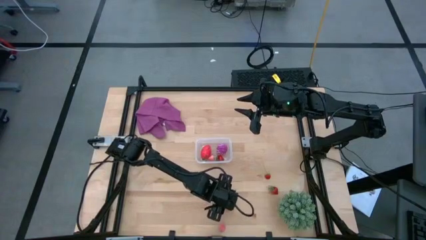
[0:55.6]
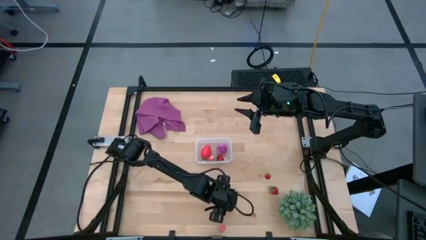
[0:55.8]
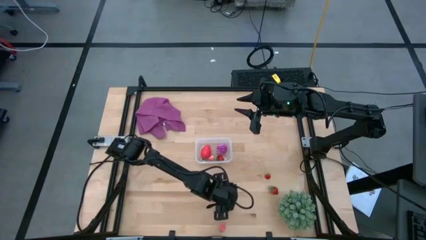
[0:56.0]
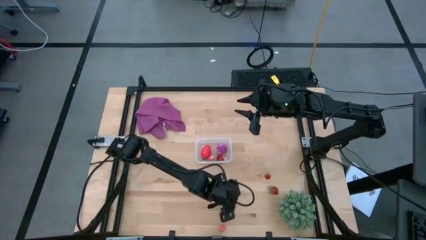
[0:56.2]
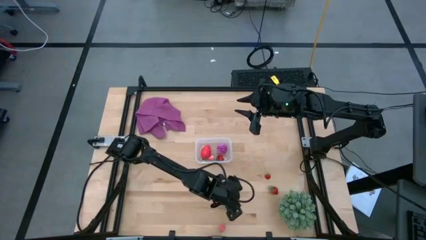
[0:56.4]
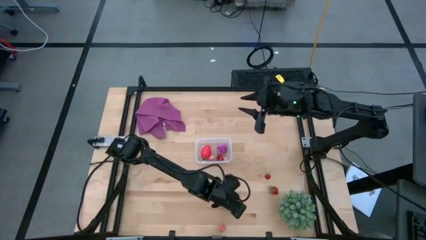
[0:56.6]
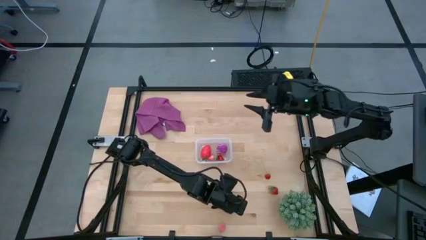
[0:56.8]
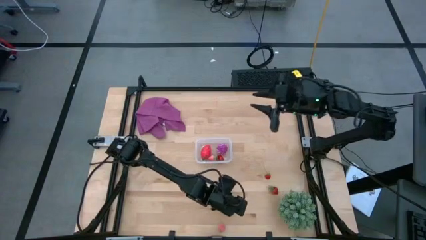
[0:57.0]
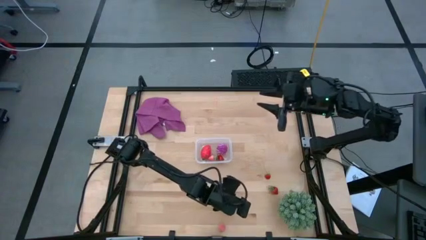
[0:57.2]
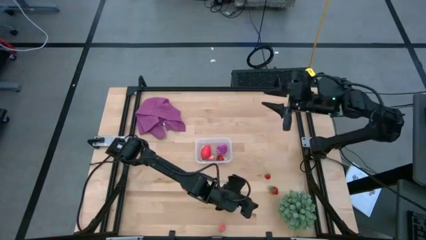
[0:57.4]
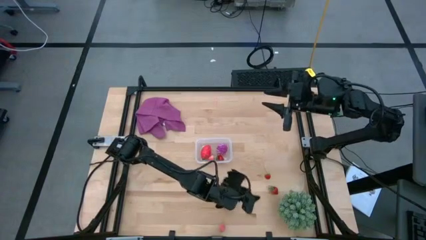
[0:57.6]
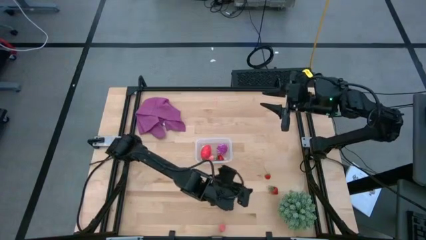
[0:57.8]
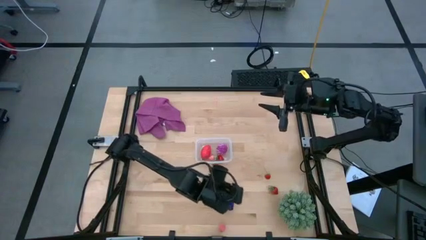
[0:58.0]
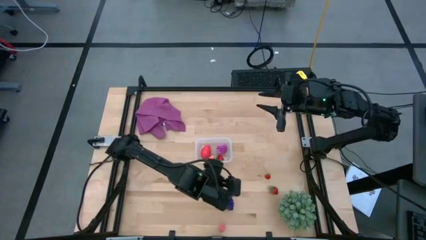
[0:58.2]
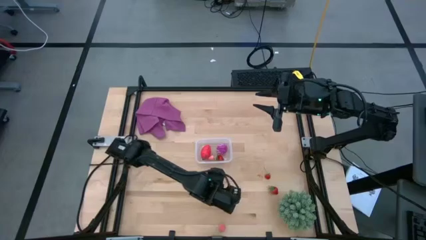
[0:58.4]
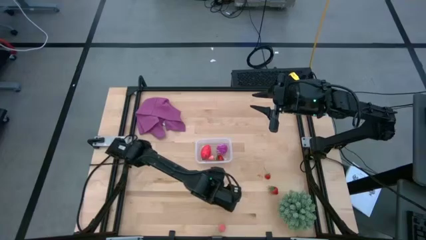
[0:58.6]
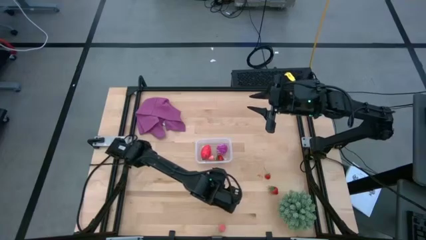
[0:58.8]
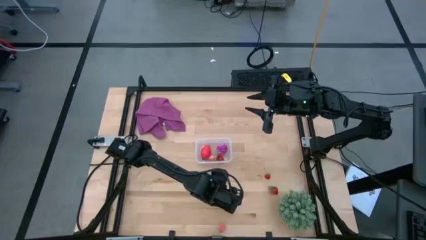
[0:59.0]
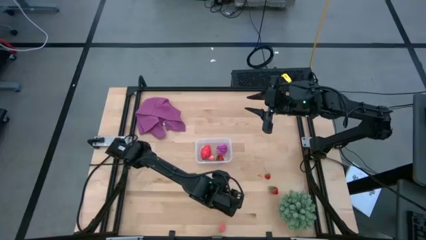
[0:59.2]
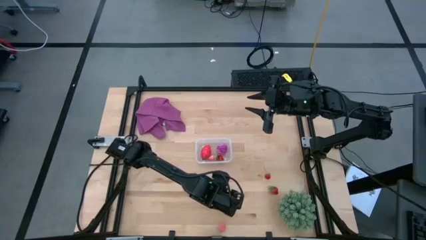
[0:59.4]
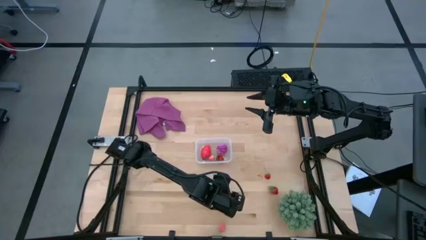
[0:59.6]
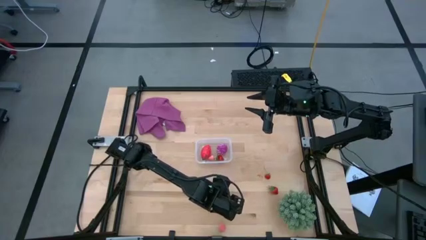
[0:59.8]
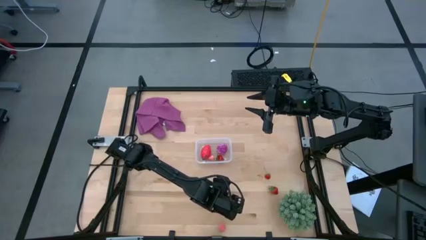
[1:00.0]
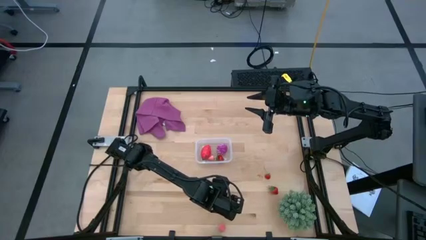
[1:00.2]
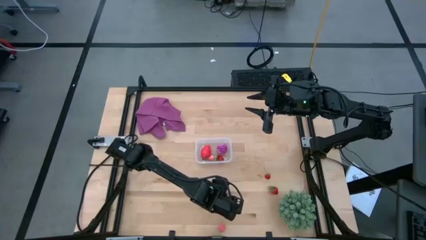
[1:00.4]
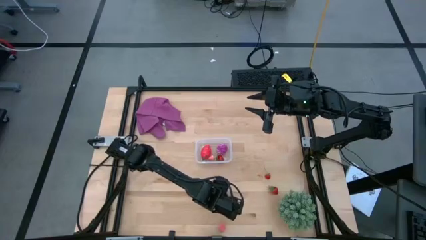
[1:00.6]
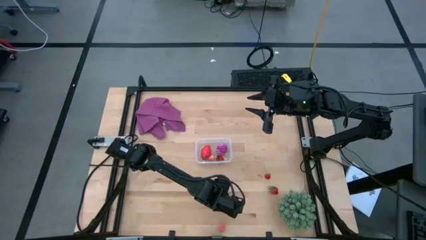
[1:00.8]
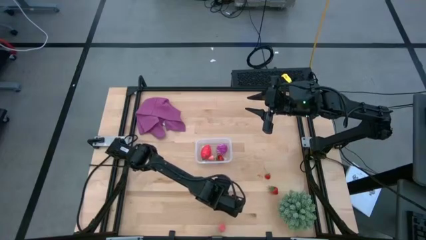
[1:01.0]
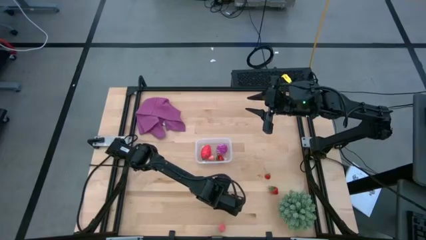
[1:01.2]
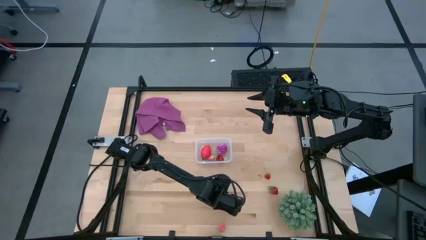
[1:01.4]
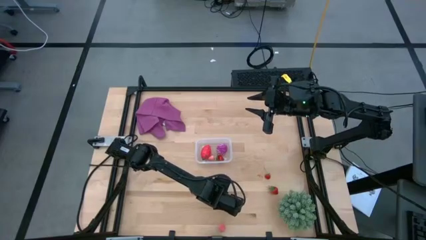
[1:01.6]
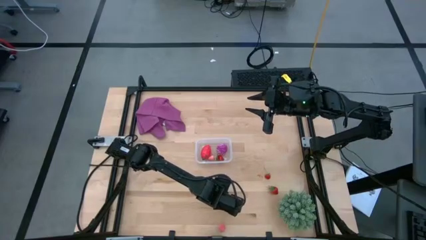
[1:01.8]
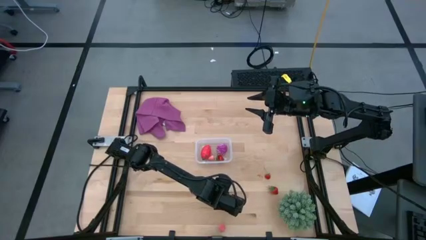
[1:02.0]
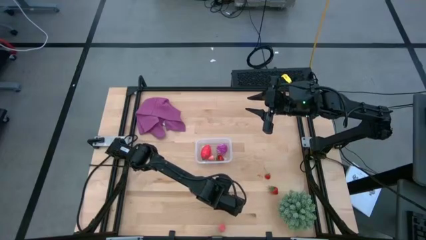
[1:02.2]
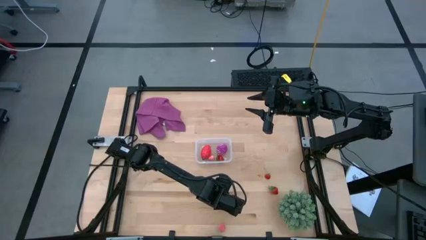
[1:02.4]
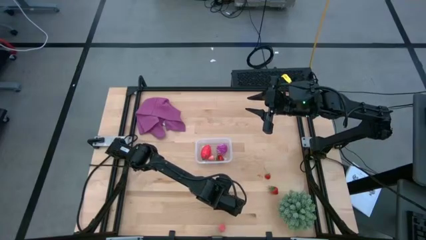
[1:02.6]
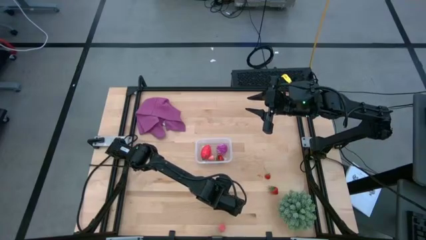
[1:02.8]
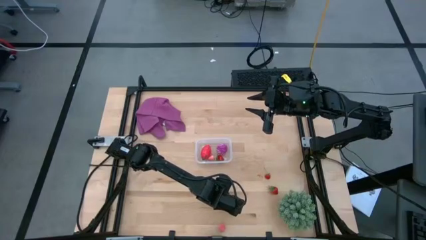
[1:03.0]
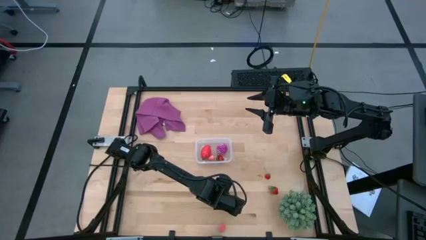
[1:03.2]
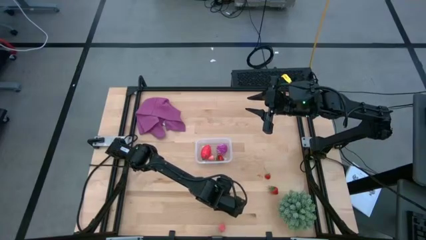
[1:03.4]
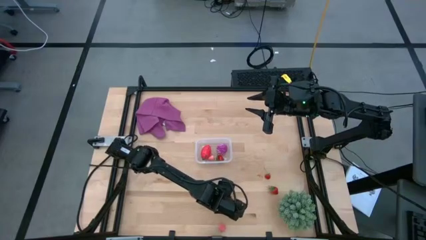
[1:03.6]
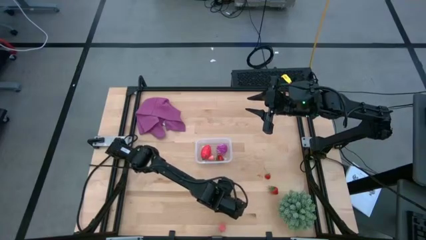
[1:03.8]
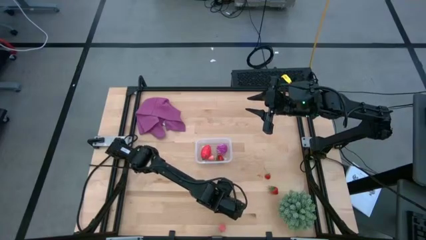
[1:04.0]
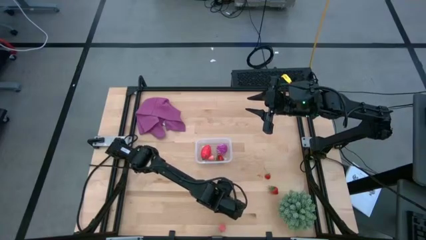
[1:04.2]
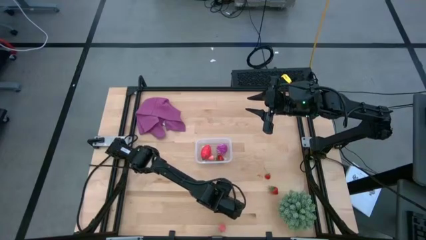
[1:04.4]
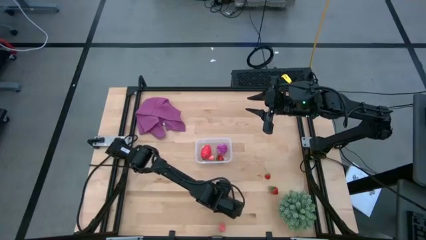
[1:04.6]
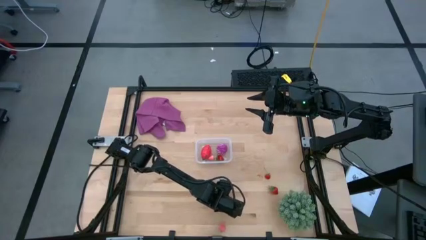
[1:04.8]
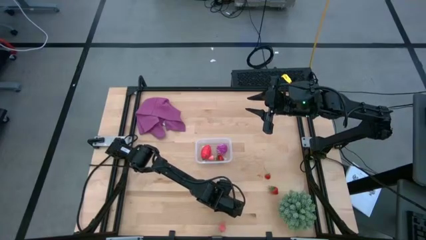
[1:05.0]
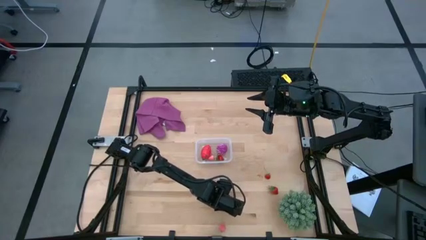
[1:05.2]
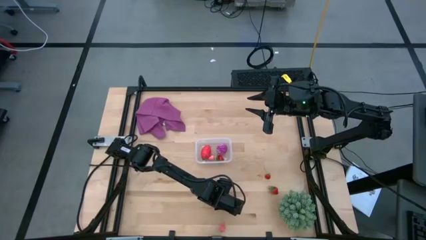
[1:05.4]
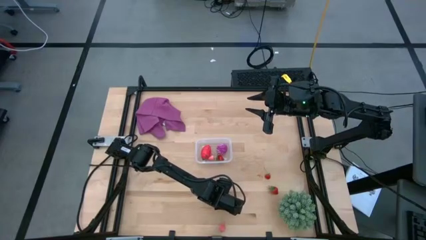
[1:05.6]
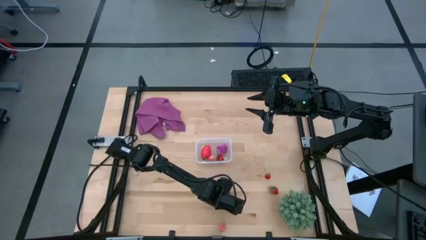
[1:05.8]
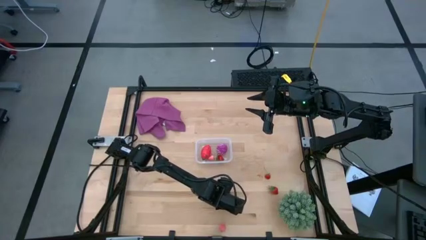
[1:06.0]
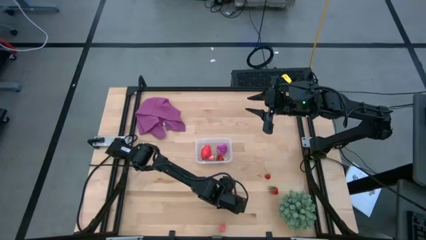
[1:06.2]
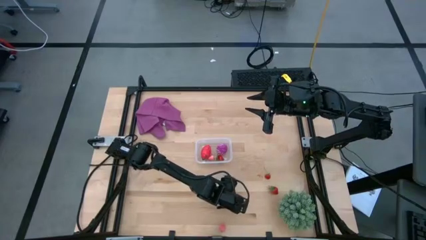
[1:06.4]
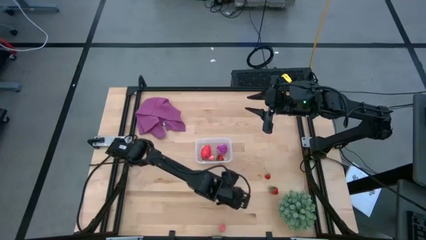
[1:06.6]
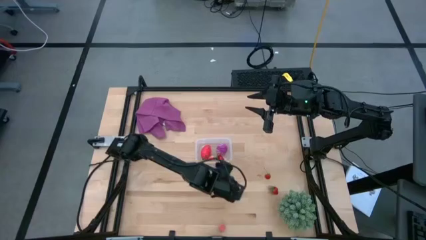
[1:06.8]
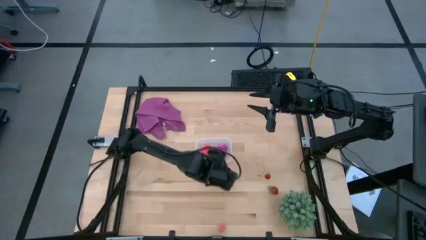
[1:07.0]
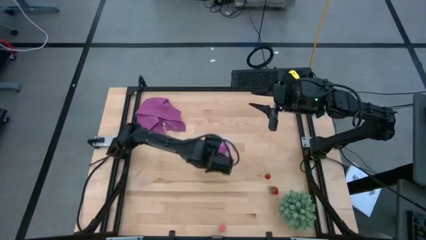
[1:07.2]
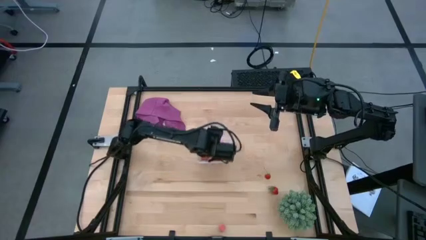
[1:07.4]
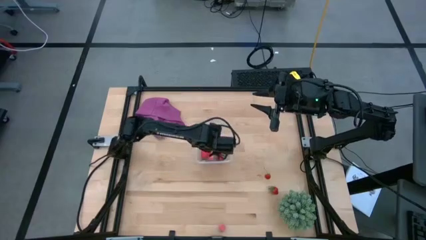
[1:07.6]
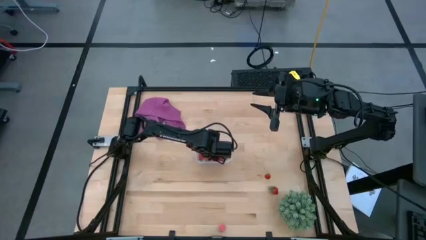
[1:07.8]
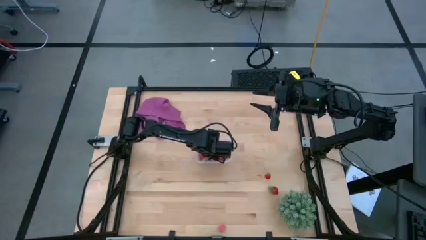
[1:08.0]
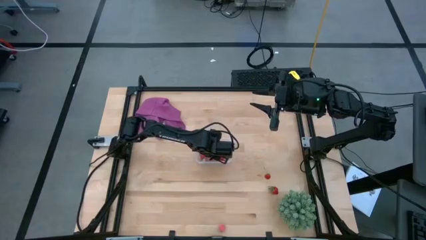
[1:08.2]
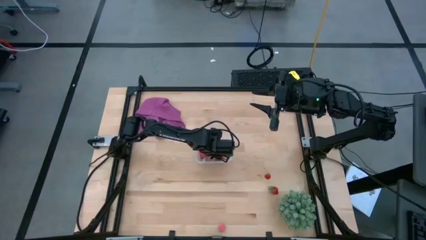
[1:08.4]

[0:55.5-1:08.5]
Task: Pick and placing Produce into tupperware
Put the violet grapes into the transparent bin

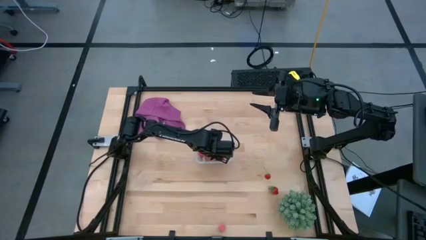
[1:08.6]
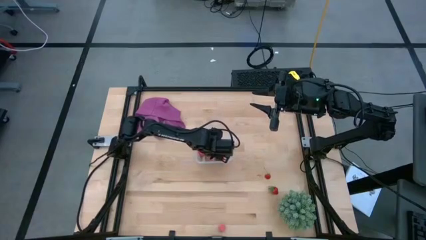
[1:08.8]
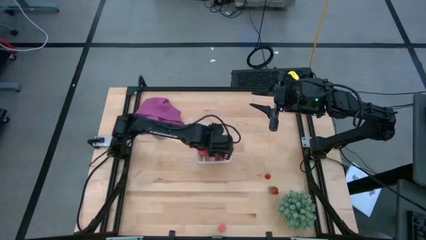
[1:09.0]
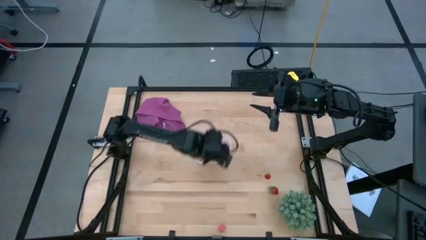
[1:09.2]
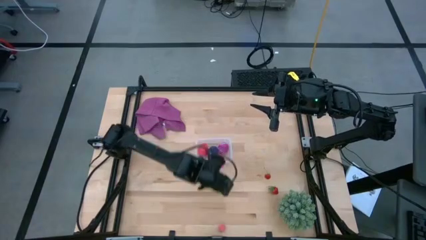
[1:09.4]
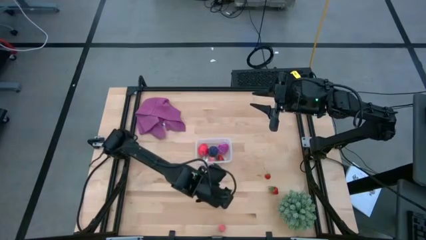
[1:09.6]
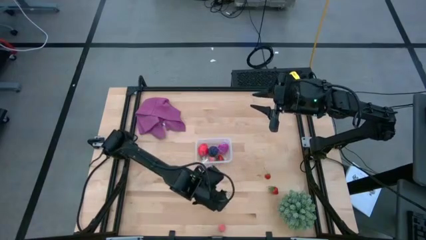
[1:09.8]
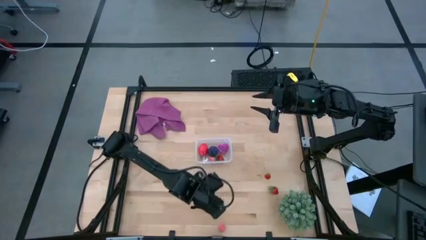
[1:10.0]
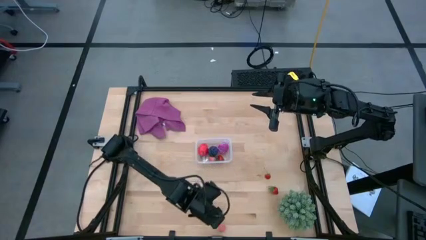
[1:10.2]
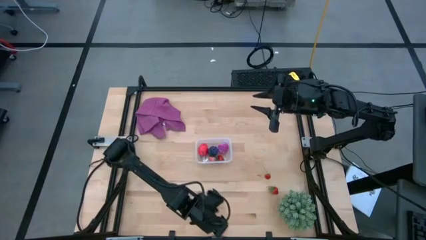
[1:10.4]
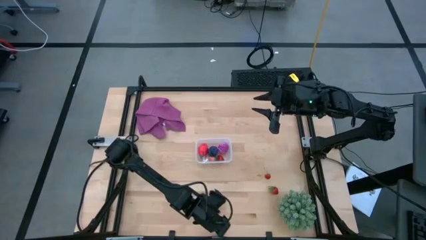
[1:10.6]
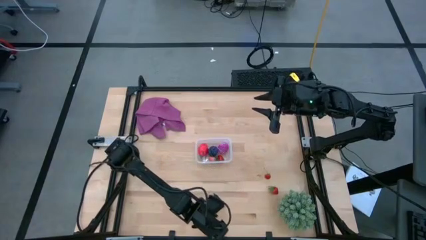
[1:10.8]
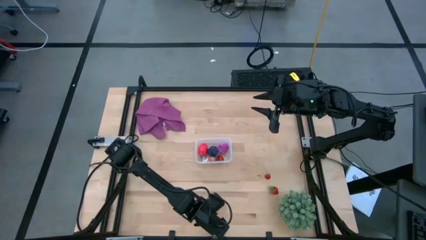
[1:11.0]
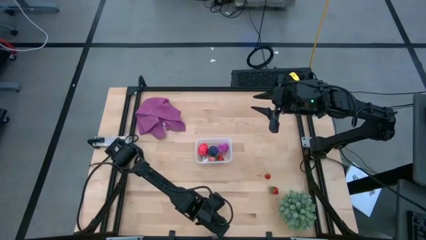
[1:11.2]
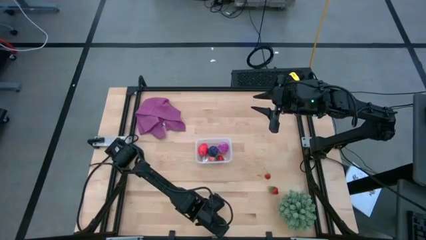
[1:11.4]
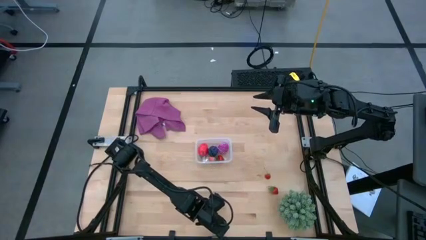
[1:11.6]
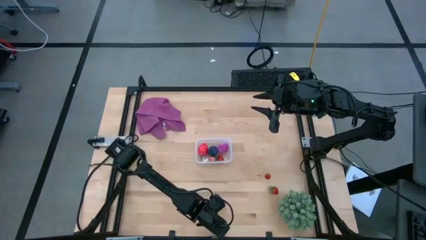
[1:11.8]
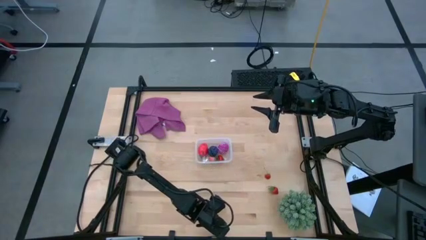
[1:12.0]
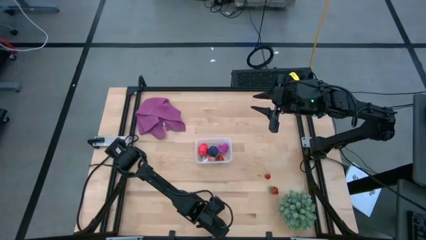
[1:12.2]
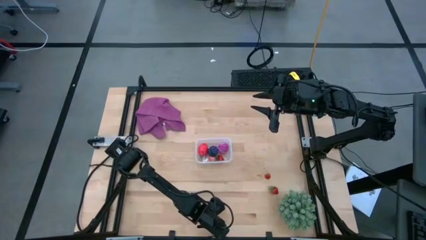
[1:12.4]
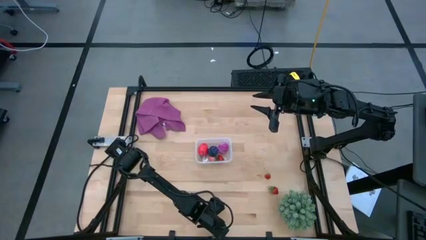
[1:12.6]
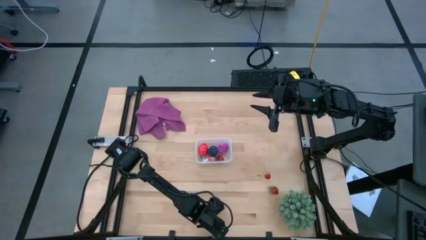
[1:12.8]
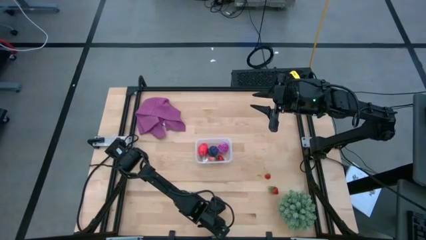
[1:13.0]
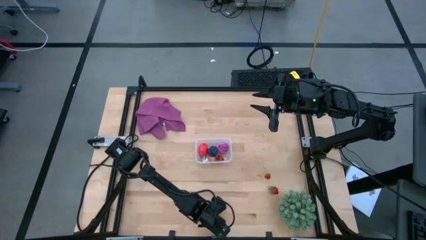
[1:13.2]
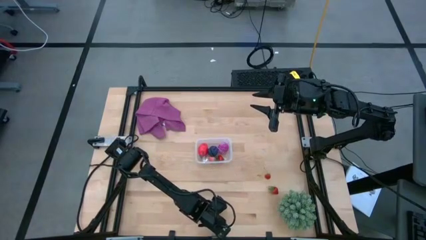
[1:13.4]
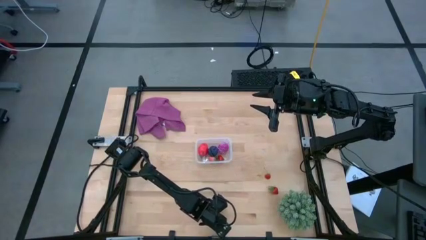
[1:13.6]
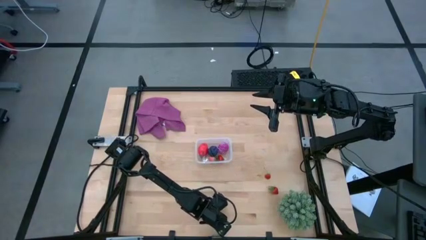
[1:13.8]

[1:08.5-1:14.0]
Put the pink peach into the transparent bin
